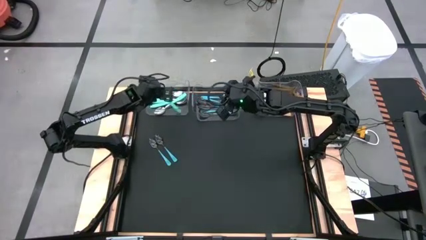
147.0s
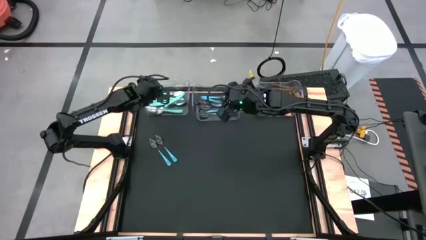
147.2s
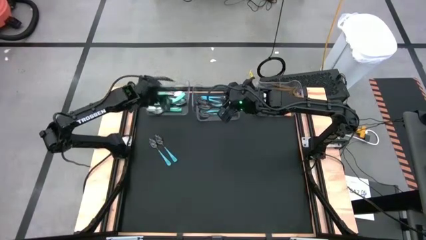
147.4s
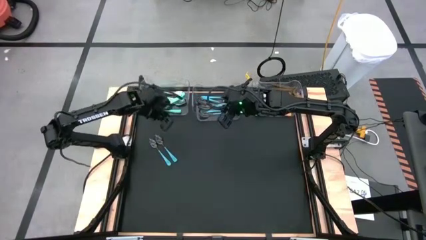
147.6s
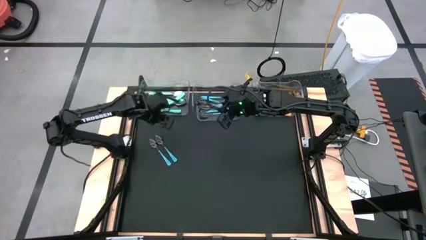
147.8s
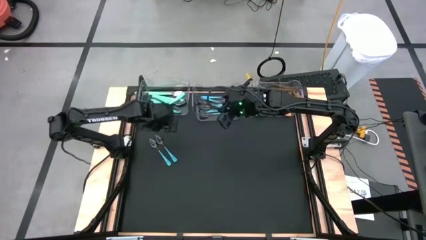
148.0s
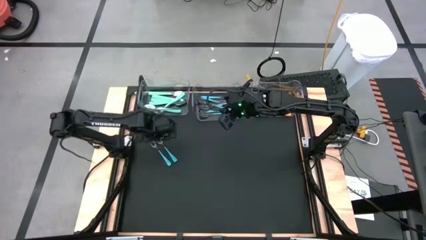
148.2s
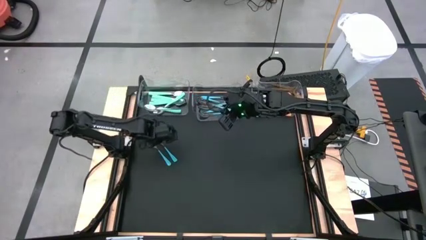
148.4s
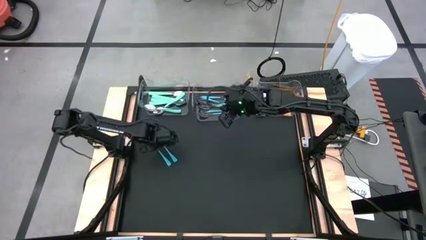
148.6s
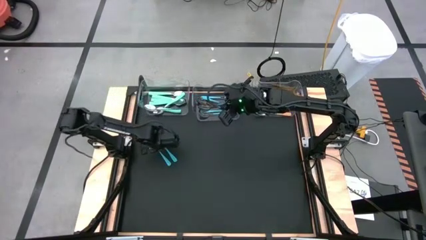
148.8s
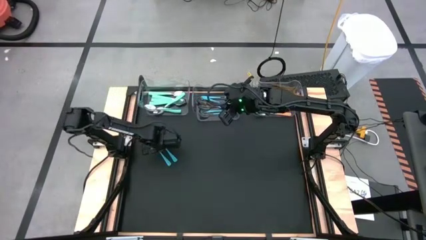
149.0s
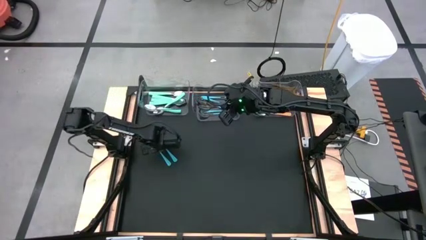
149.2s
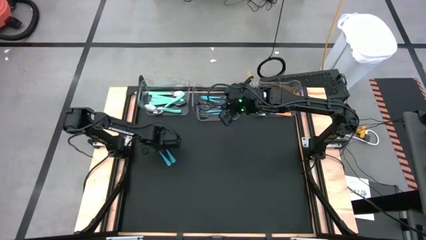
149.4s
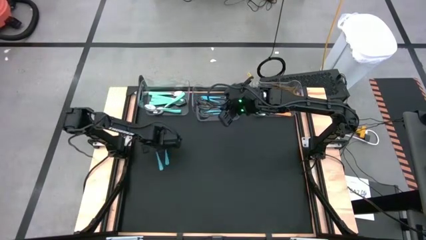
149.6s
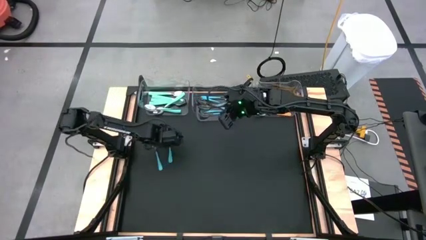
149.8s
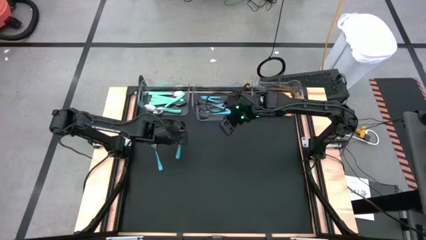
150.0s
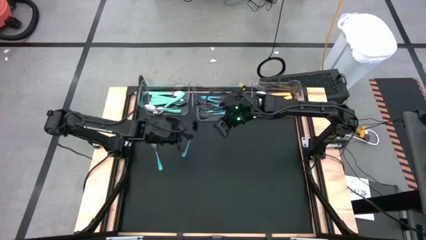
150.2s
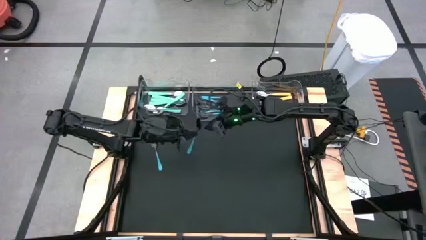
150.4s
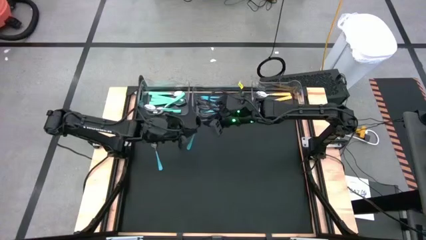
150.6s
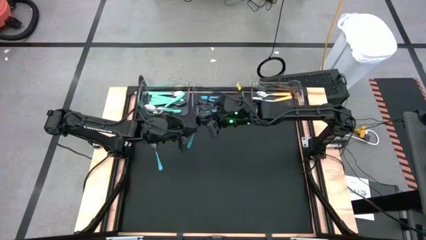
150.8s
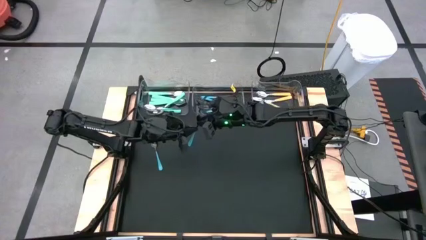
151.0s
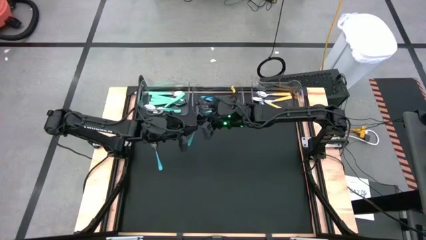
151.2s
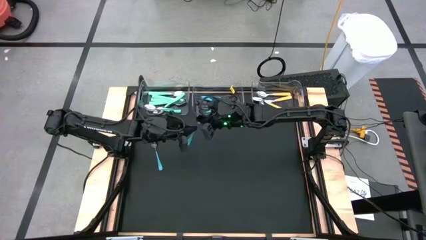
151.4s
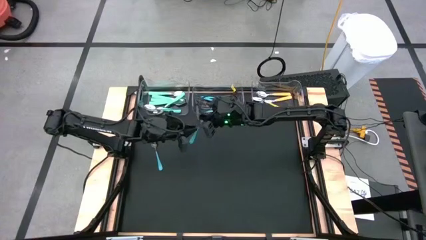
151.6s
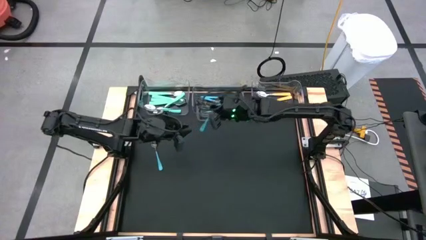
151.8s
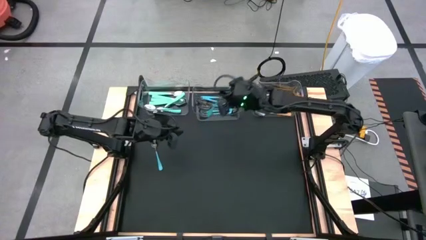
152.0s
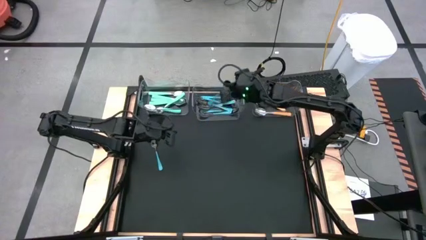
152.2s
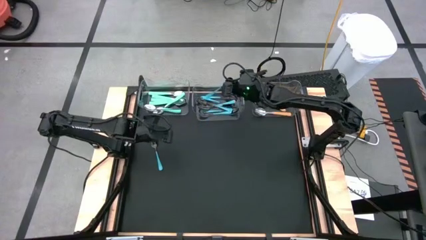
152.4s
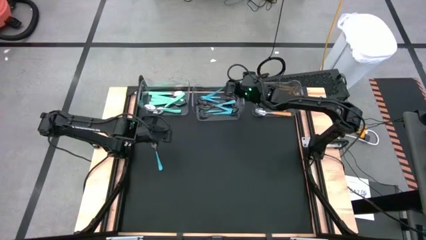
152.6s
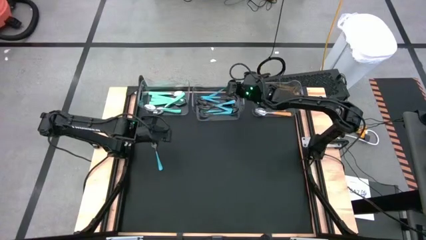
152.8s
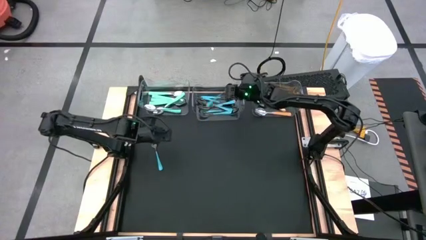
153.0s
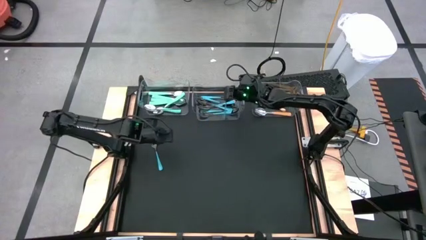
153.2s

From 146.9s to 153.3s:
Task: Sort silverware by color (type)
Put the blue spoon into the middle transparent bin

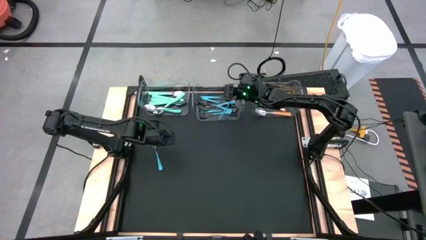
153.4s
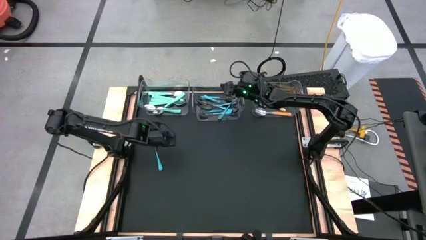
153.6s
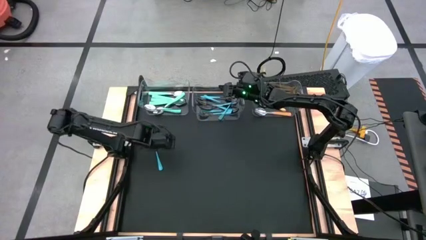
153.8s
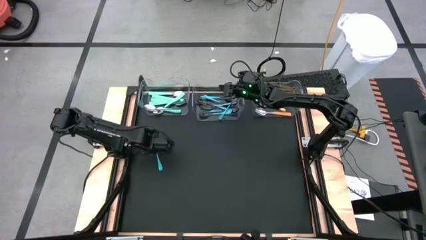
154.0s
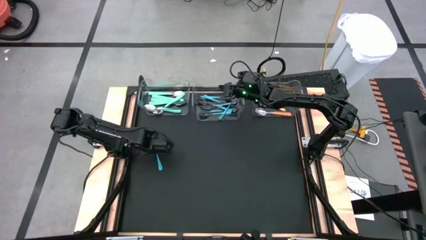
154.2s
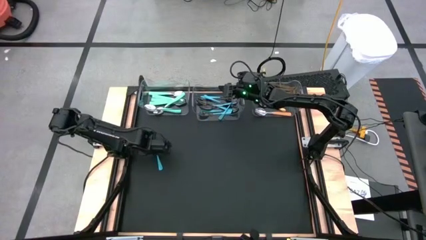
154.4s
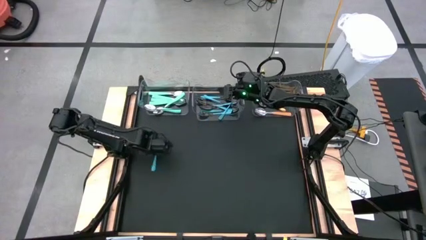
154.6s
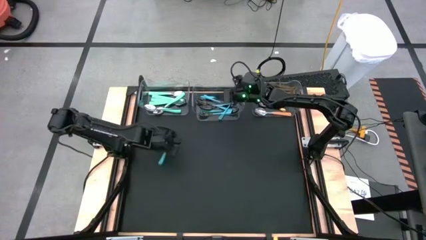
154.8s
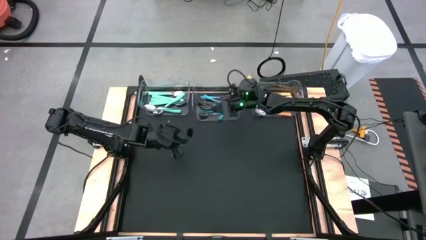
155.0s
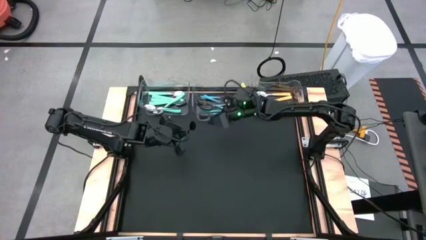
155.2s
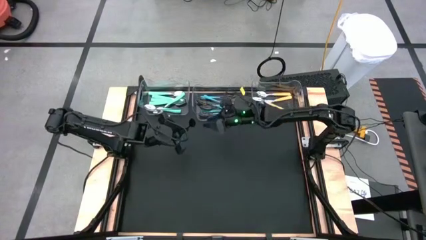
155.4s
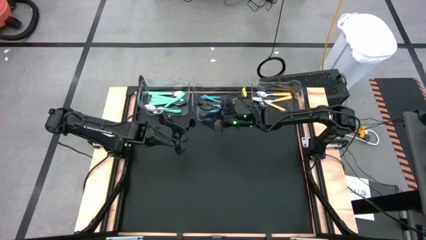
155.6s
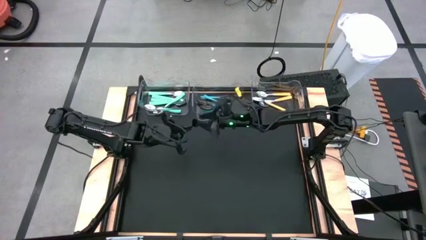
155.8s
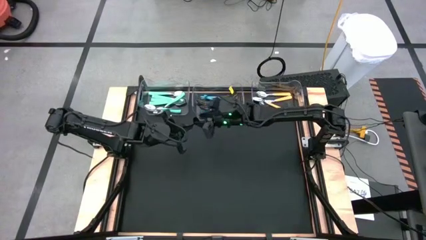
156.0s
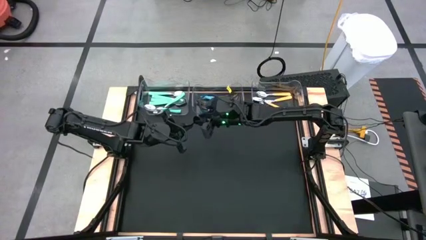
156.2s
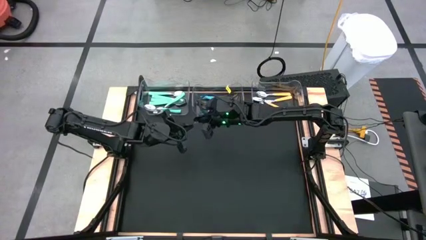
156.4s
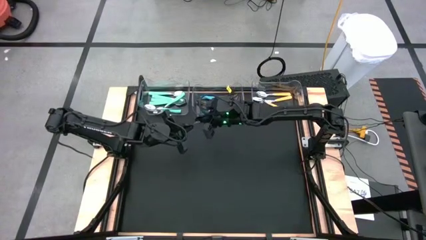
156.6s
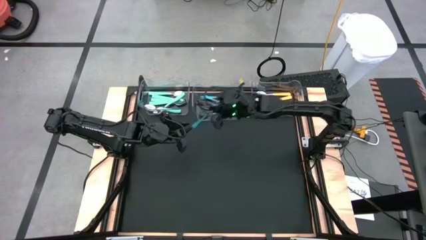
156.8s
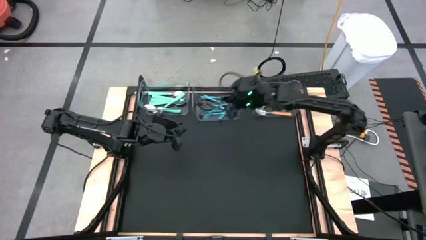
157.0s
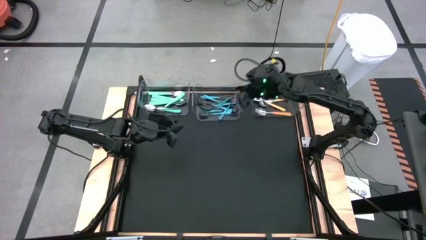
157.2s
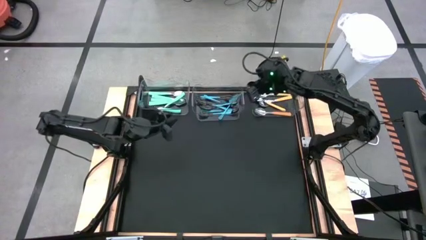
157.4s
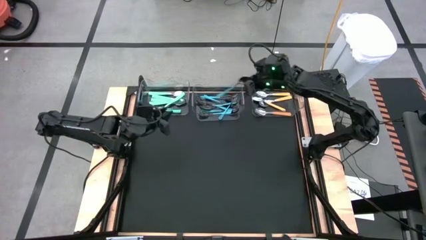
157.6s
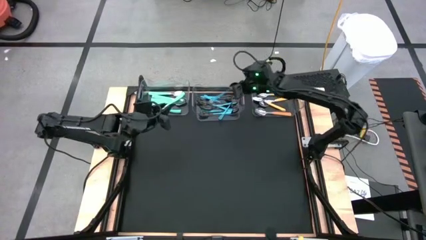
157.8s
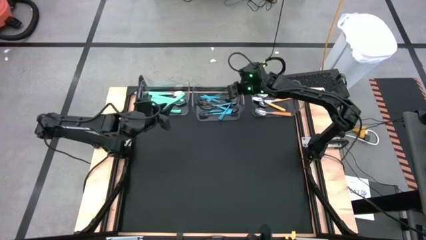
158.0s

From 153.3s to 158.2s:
Put the blue spoon into the middle transparent bin
